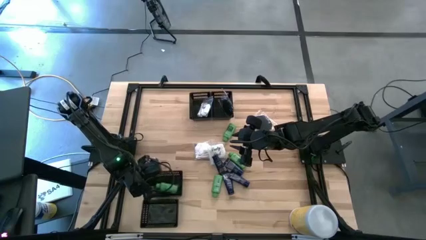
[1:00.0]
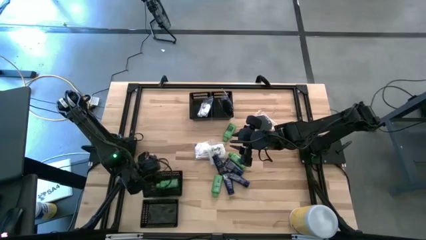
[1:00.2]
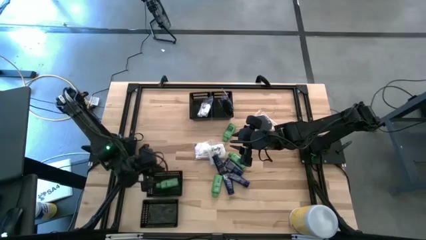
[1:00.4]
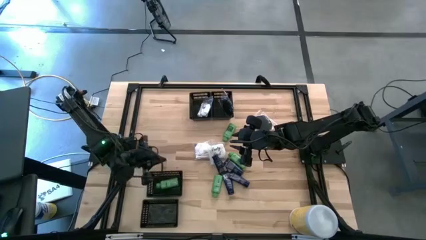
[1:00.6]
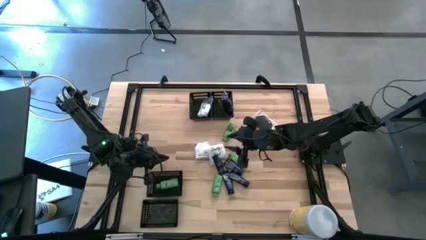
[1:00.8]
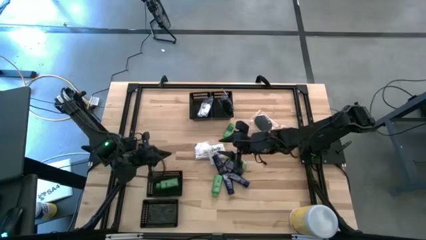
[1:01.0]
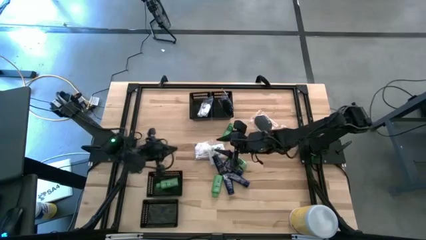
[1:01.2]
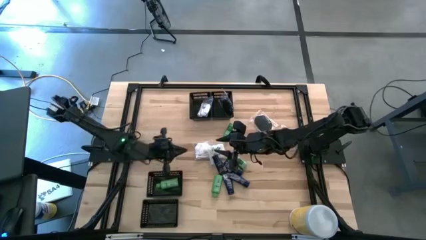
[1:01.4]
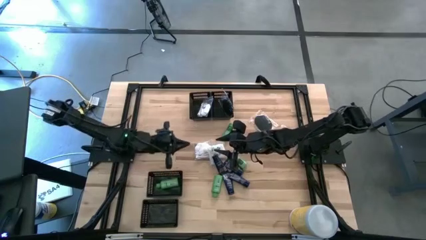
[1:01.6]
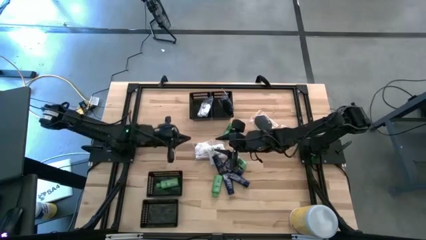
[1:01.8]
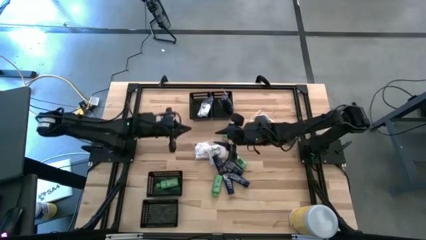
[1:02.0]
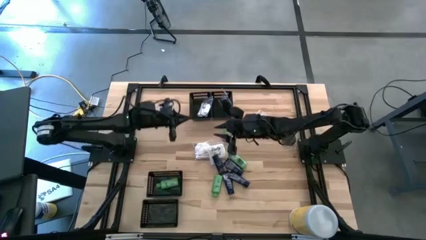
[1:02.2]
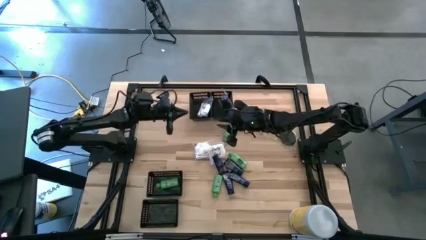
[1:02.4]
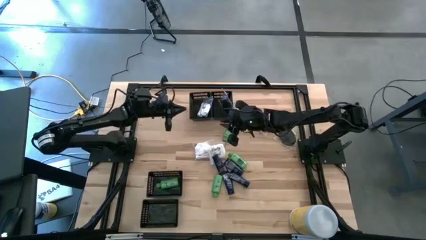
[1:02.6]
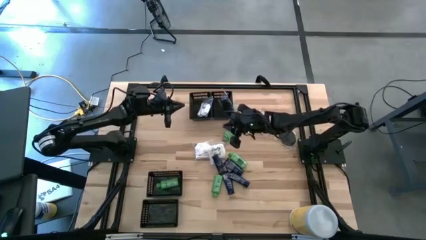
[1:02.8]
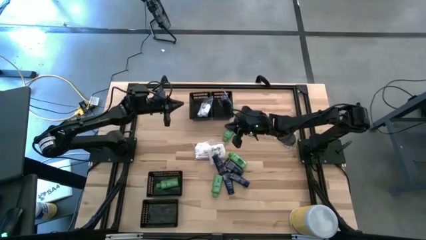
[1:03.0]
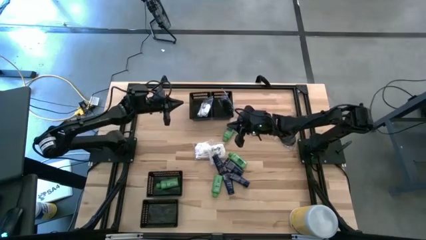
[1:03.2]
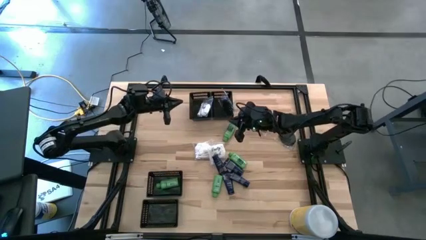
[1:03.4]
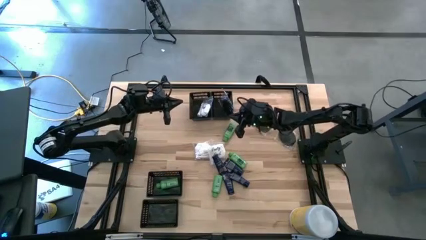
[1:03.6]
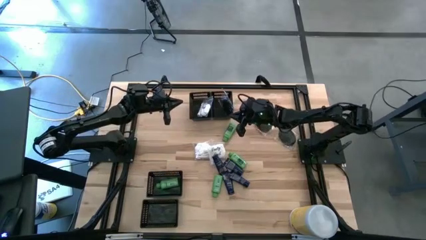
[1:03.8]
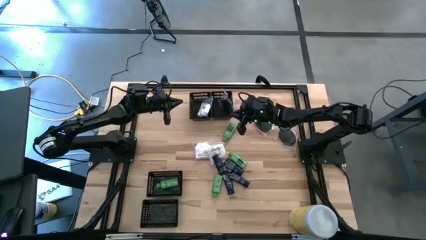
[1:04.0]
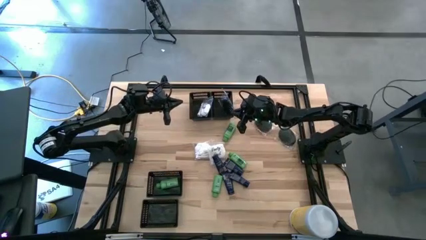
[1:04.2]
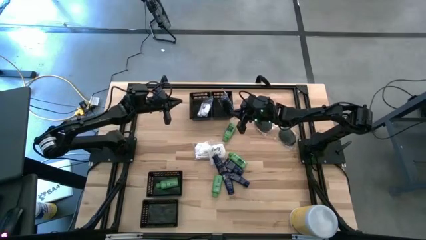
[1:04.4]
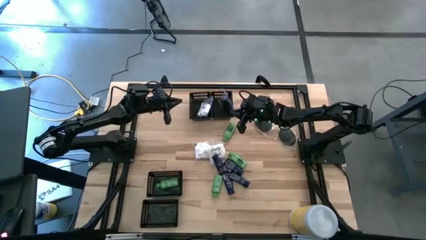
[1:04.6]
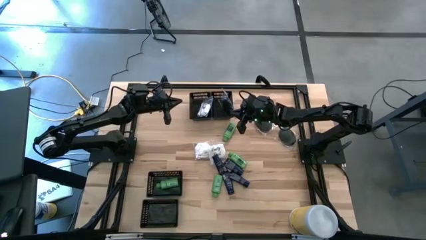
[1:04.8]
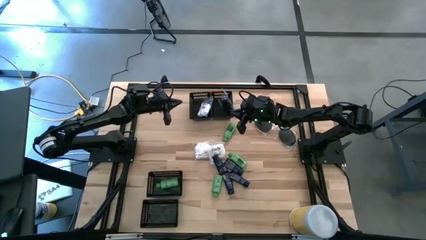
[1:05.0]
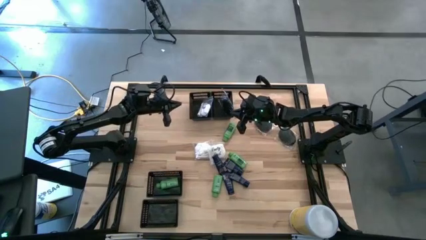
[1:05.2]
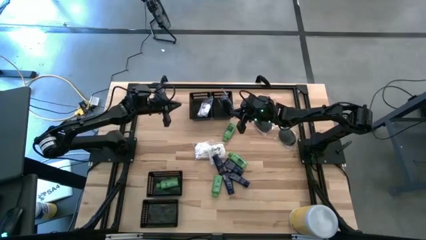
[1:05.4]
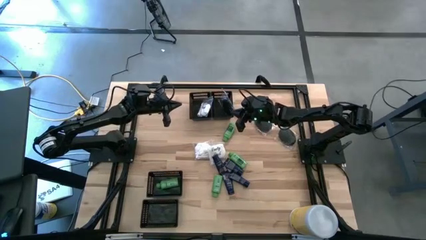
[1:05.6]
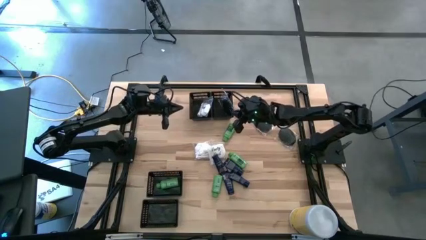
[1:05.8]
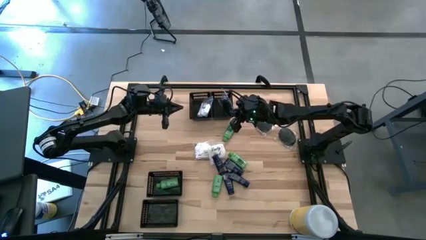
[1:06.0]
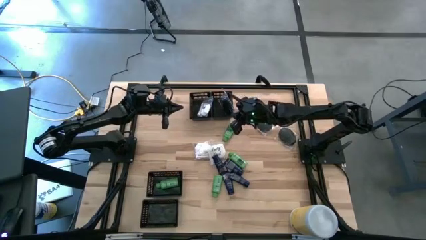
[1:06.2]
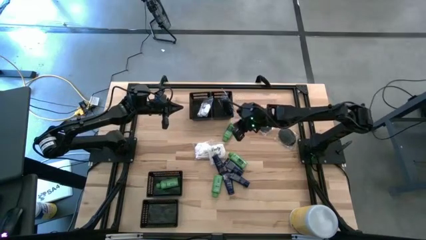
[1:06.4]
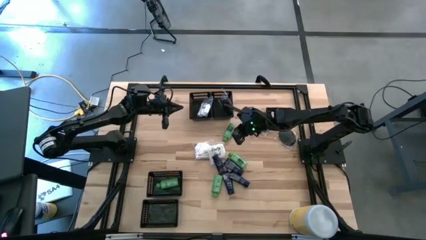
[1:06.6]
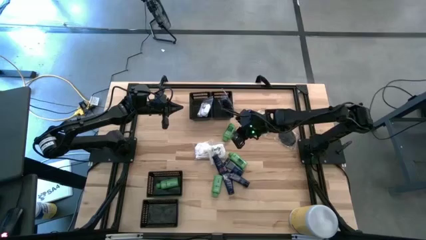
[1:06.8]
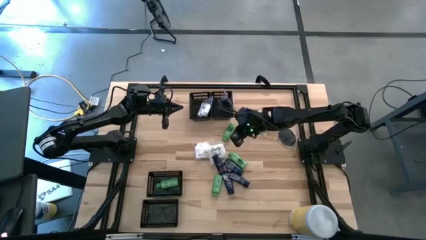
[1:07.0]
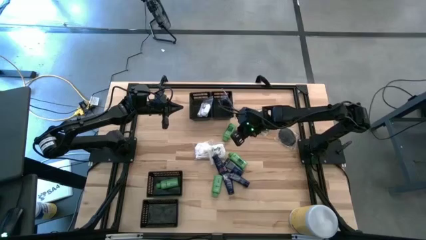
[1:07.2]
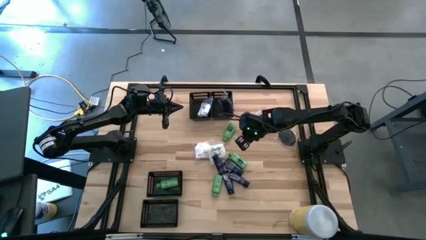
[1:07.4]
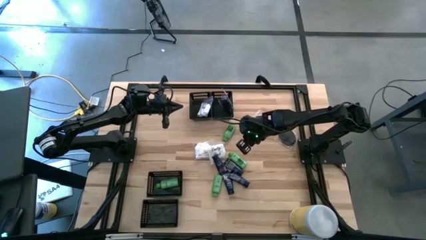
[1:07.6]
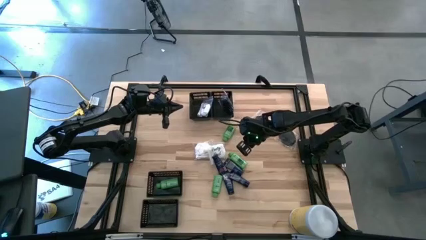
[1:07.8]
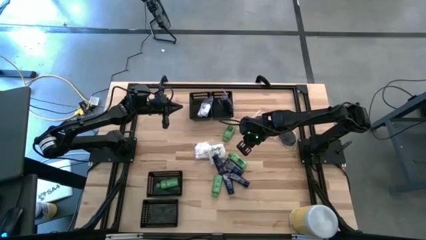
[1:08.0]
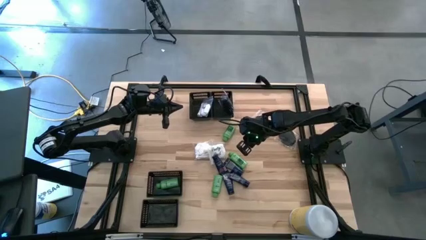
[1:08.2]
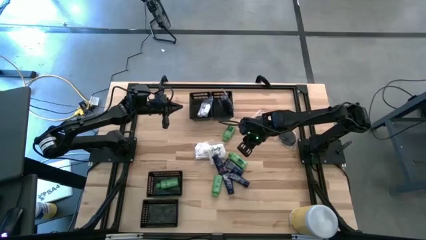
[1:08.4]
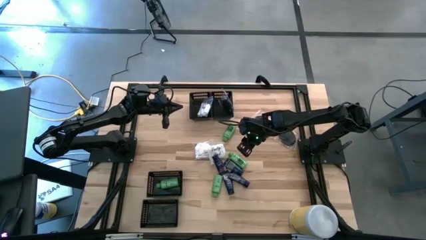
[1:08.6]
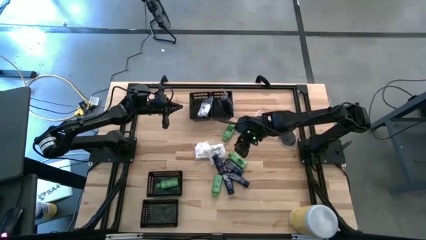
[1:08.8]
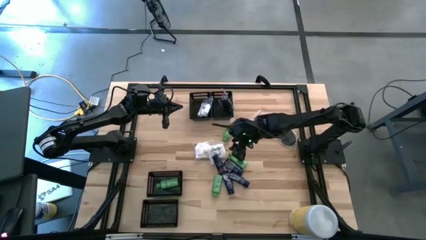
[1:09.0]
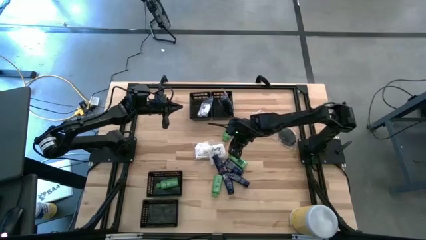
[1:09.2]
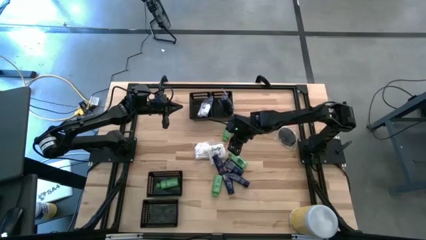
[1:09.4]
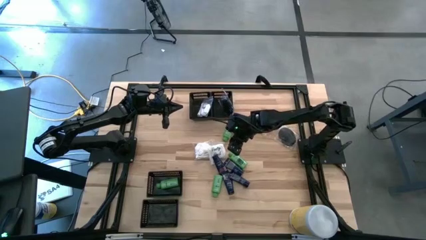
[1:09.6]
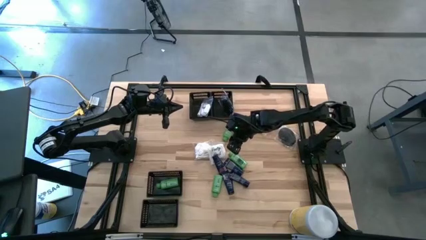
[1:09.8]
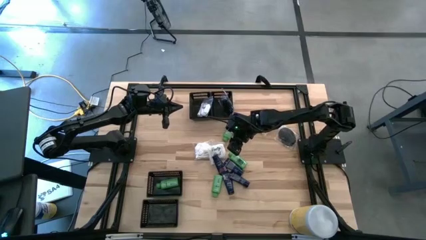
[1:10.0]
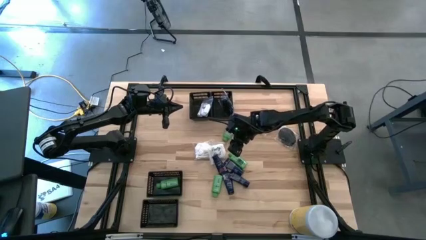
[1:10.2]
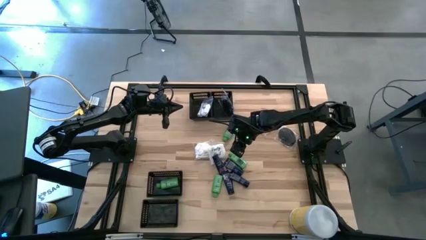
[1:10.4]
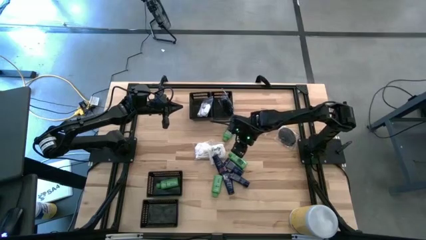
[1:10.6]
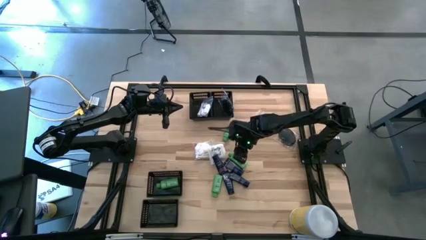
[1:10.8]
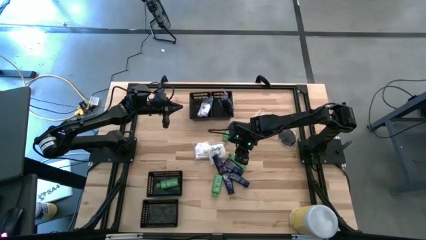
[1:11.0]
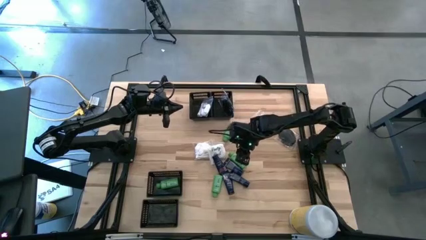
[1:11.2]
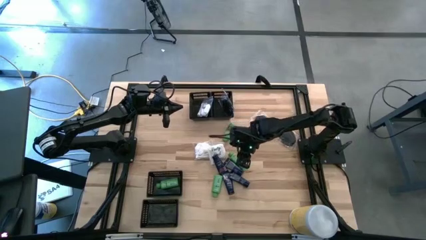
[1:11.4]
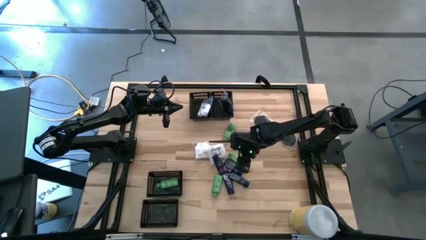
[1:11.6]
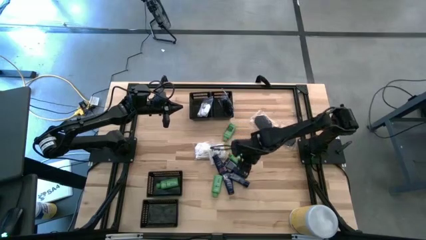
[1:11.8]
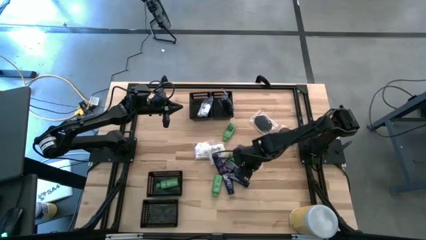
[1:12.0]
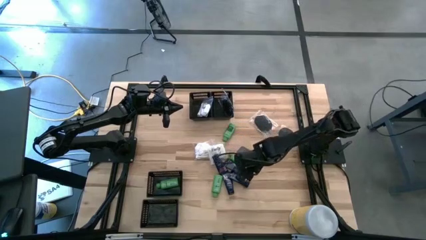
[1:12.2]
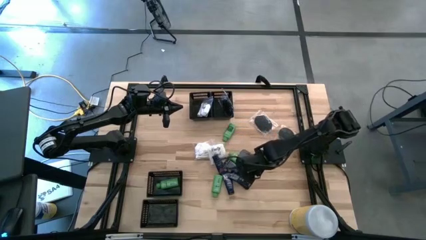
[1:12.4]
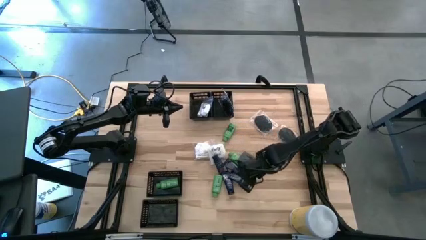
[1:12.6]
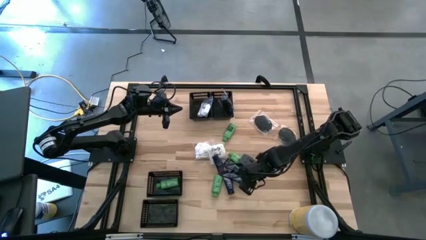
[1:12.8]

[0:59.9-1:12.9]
Task: Pick & Place Travel size toiletries
Put the dark blue shave cream into the bottom left basket

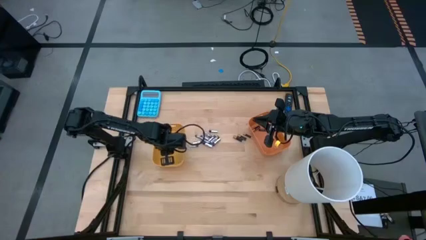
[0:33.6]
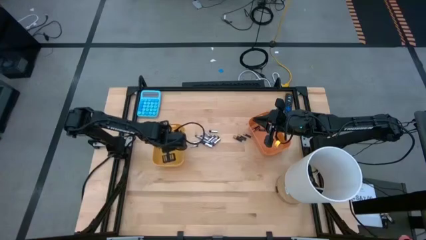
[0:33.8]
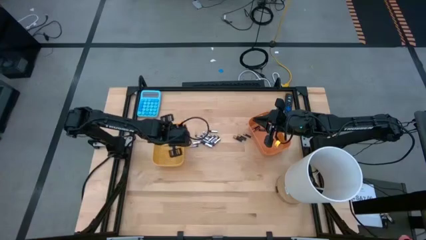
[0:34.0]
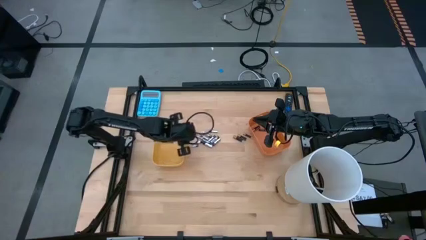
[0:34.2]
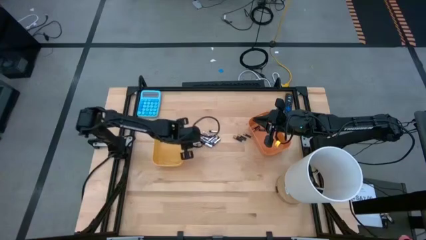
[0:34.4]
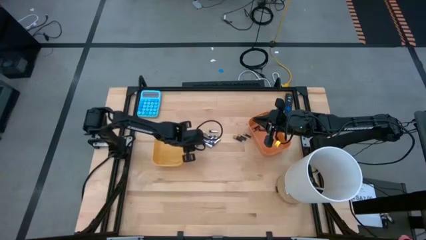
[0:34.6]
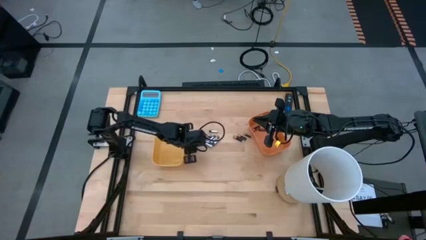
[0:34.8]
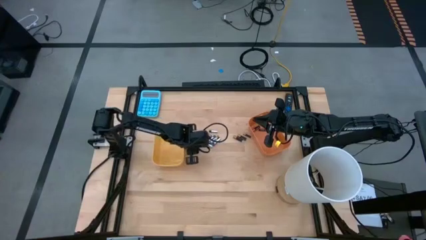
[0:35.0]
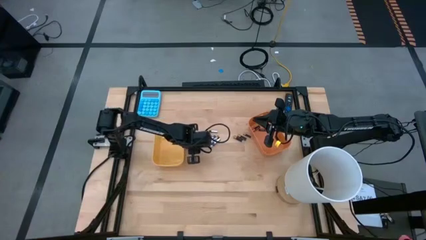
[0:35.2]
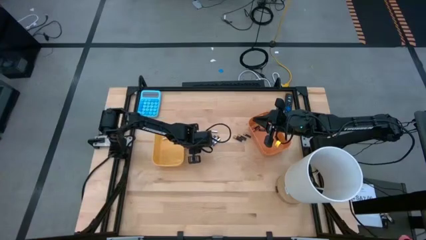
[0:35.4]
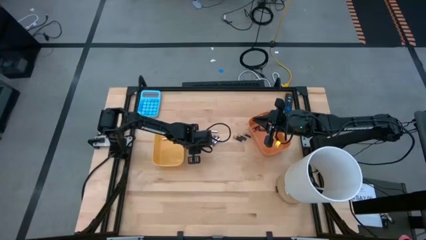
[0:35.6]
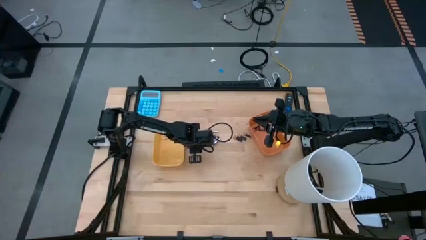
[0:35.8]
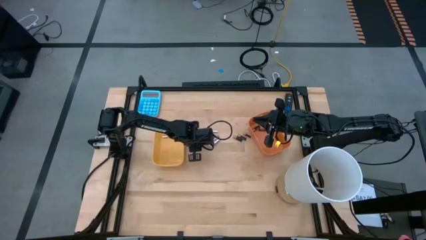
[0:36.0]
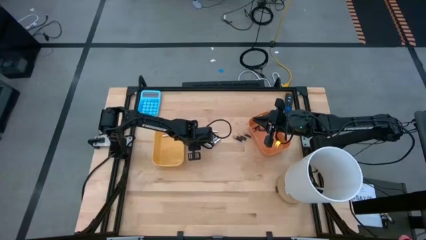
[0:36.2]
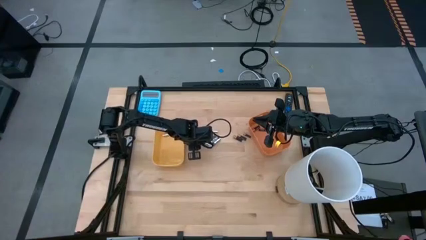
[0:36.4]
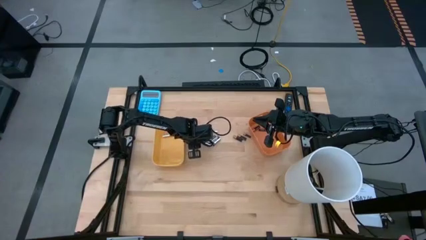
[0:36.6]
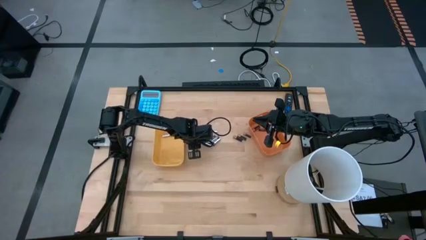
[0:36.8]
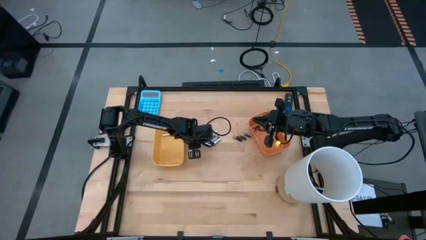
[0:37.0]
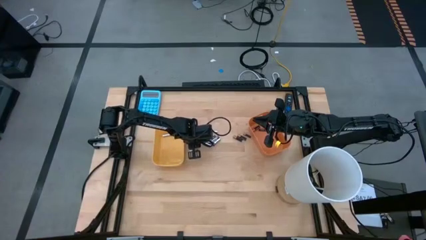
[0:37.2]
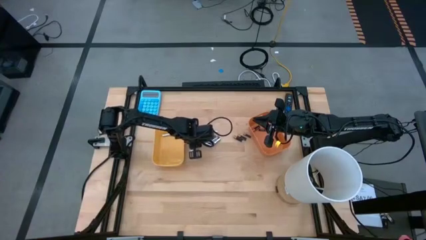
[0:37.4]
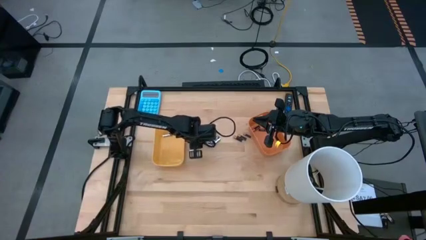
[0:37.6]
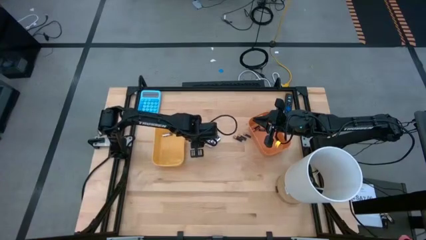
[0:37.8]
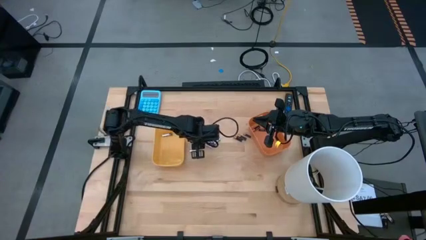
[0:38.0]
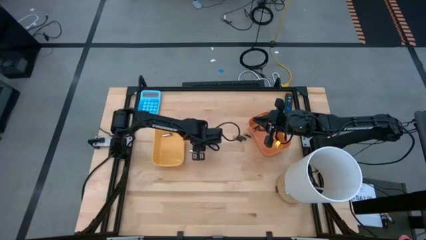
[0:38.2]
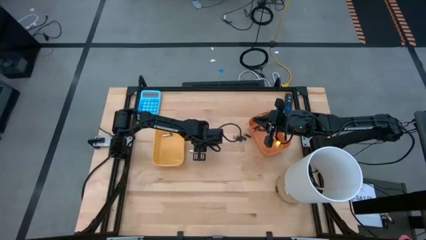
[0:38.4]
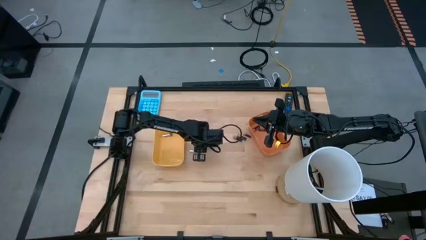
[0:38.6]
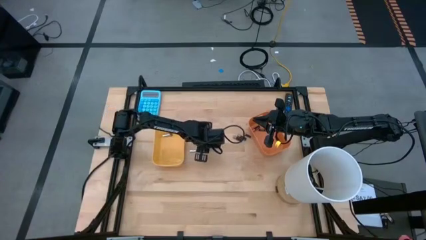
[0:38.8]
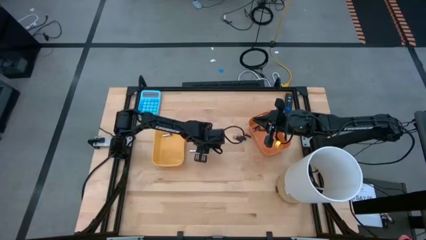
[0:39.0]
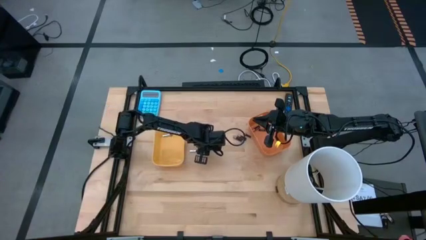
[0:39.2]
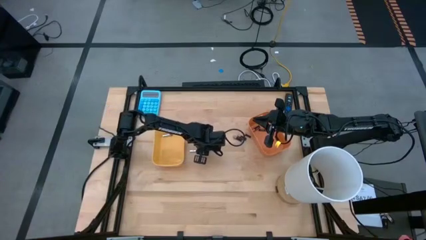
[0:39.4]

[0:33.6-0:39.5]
Task: Sort batteries
Put the silver battery into the yellow bin
